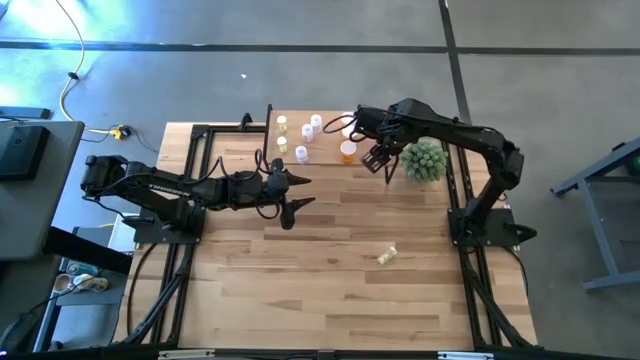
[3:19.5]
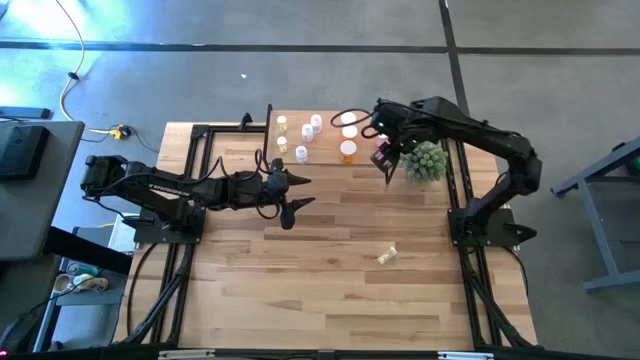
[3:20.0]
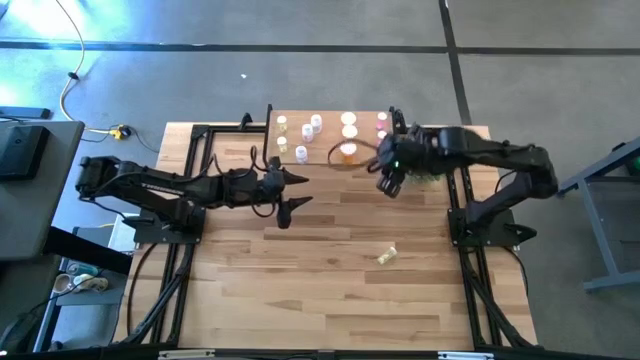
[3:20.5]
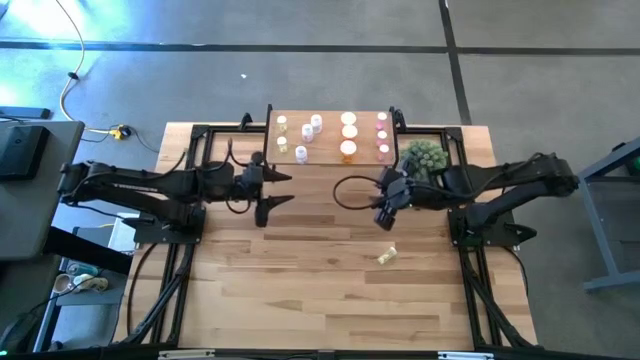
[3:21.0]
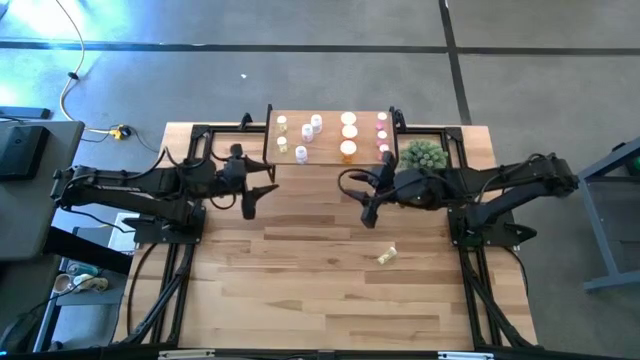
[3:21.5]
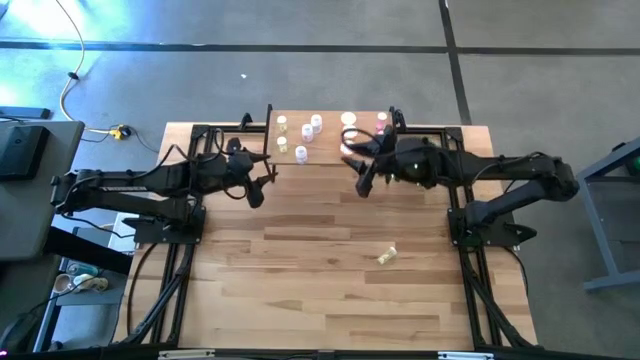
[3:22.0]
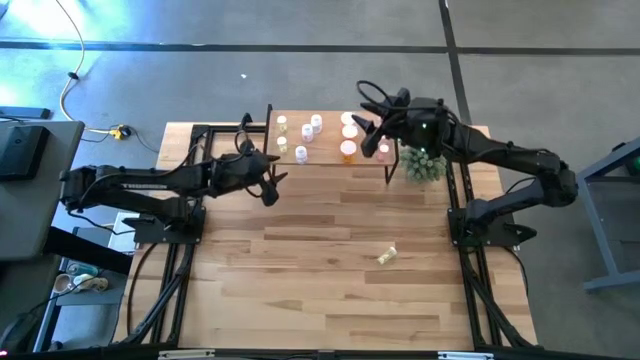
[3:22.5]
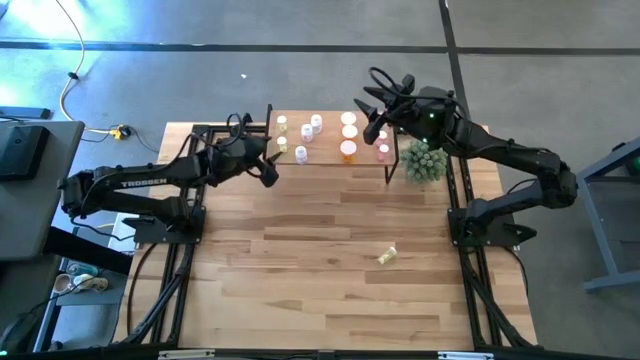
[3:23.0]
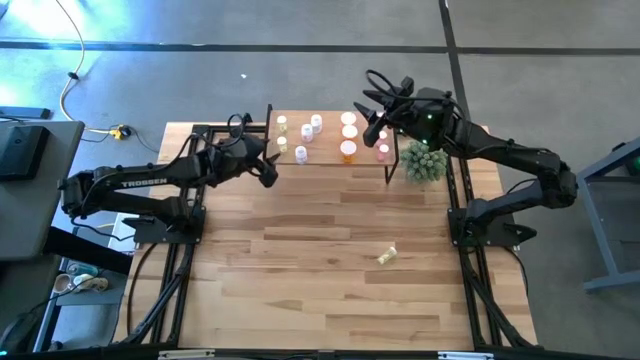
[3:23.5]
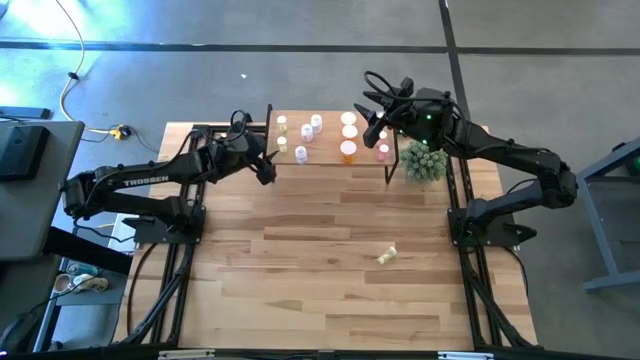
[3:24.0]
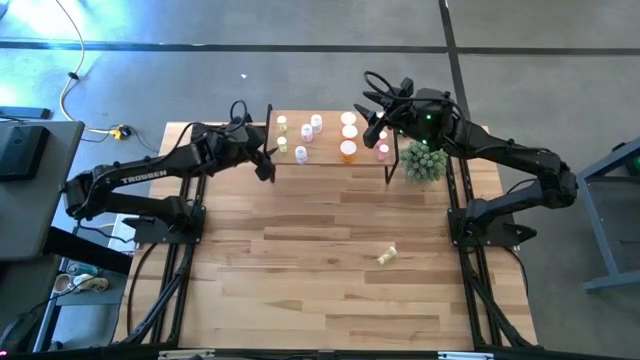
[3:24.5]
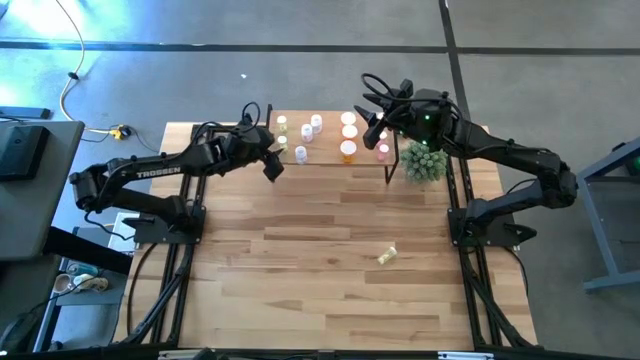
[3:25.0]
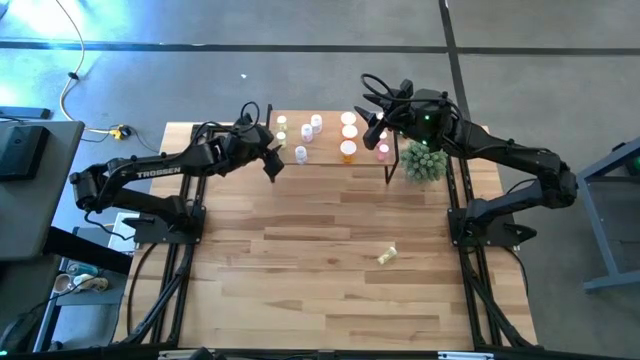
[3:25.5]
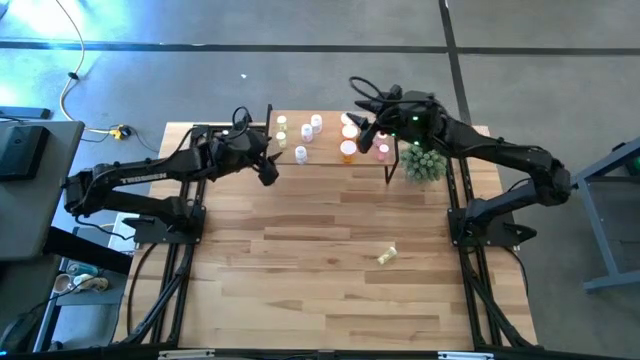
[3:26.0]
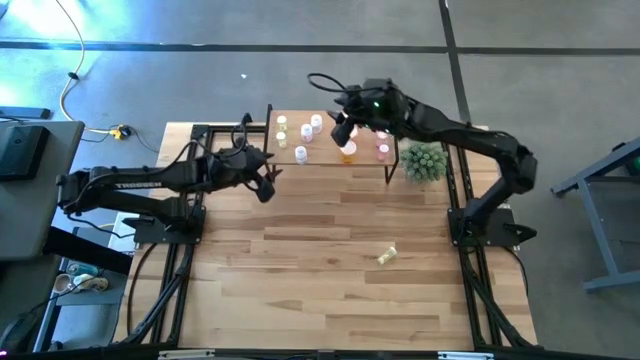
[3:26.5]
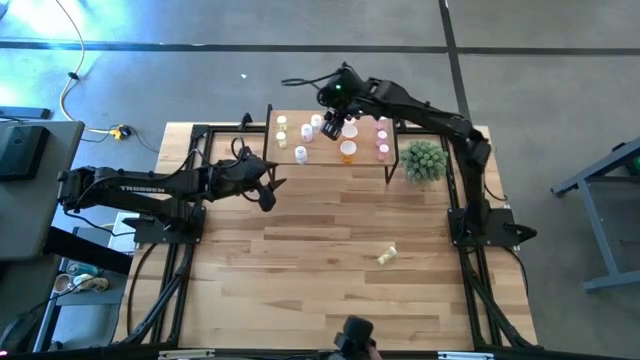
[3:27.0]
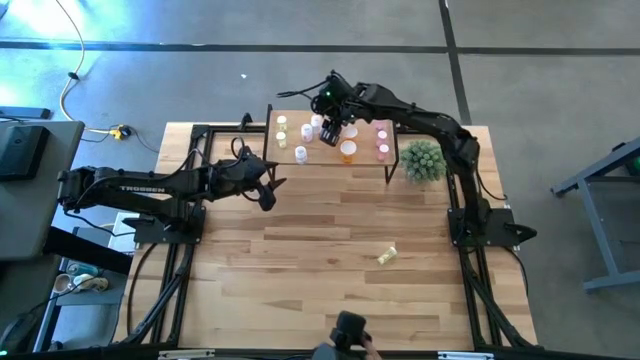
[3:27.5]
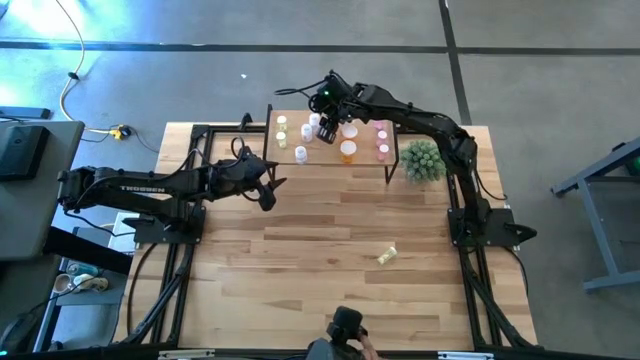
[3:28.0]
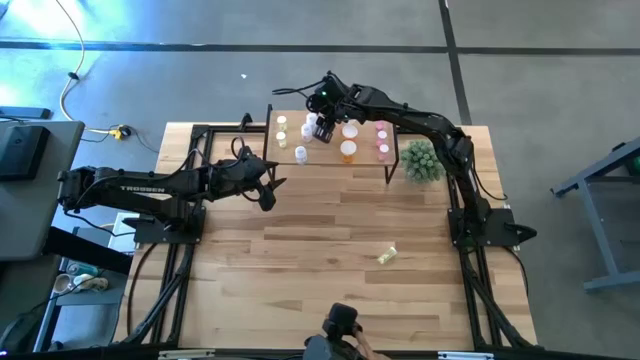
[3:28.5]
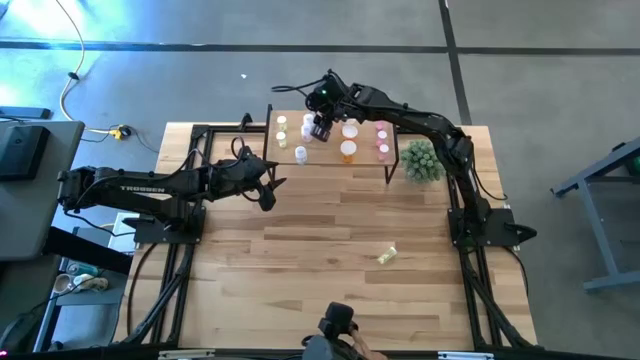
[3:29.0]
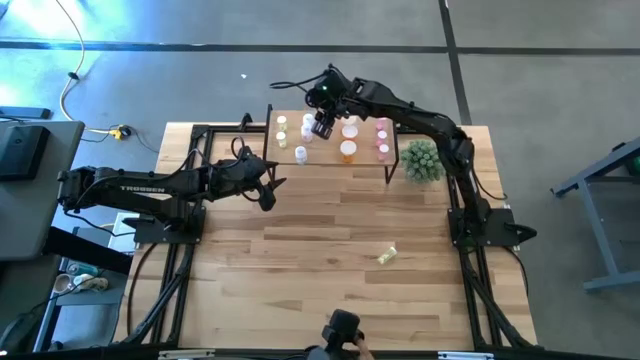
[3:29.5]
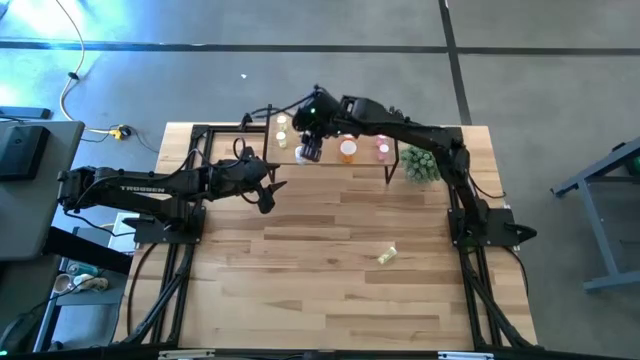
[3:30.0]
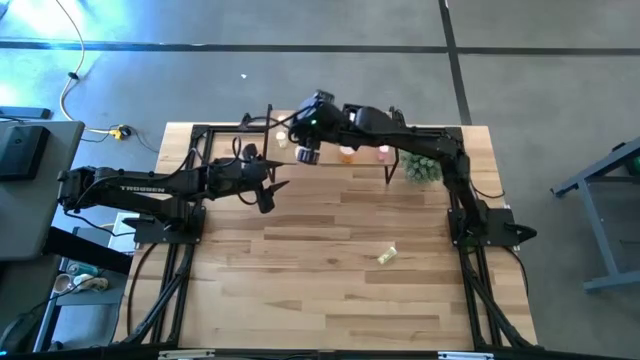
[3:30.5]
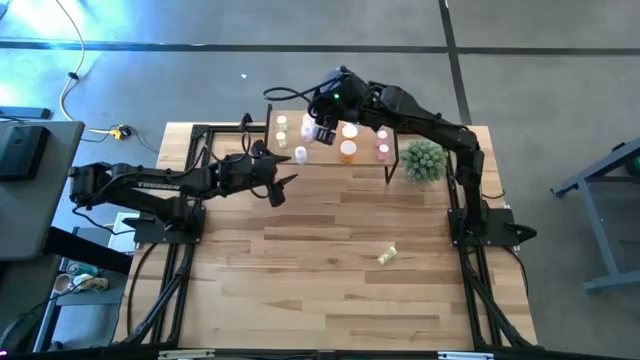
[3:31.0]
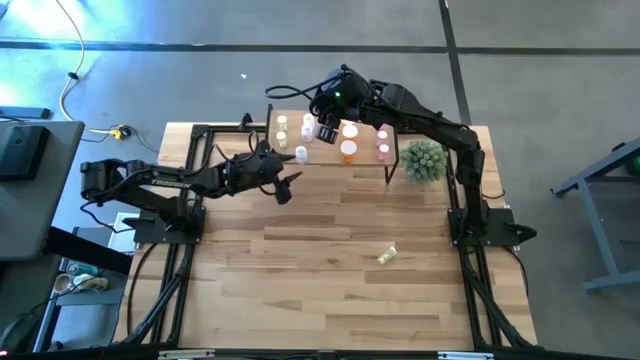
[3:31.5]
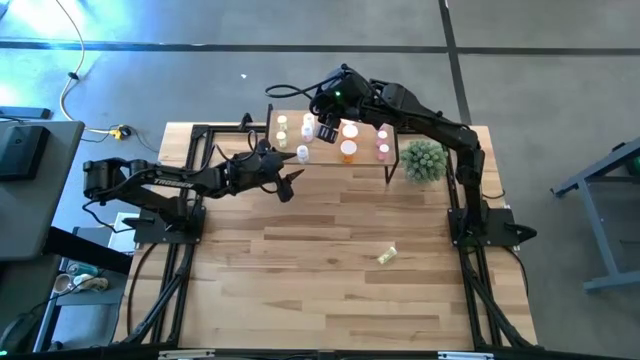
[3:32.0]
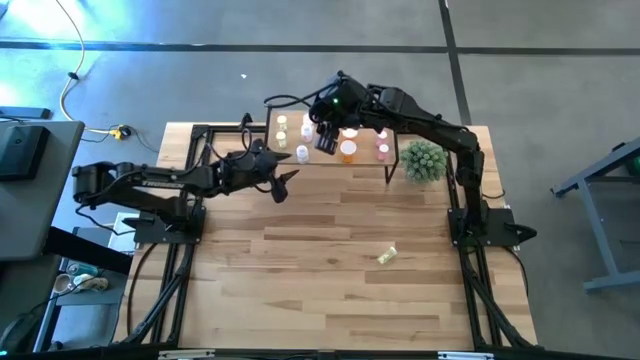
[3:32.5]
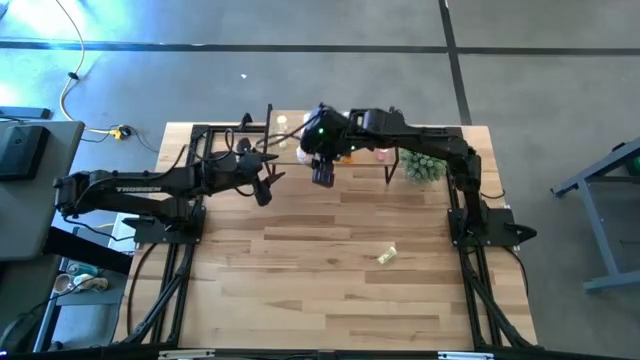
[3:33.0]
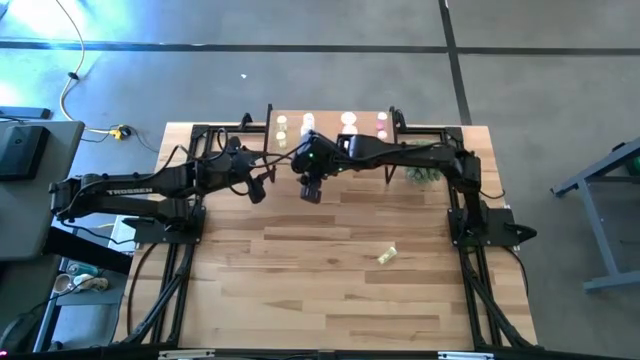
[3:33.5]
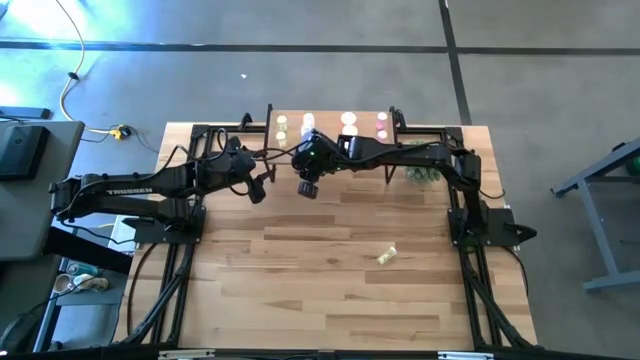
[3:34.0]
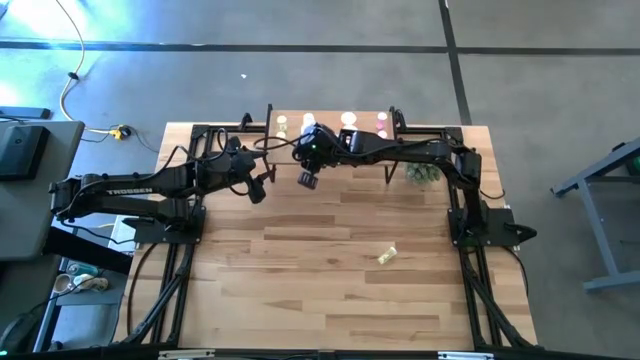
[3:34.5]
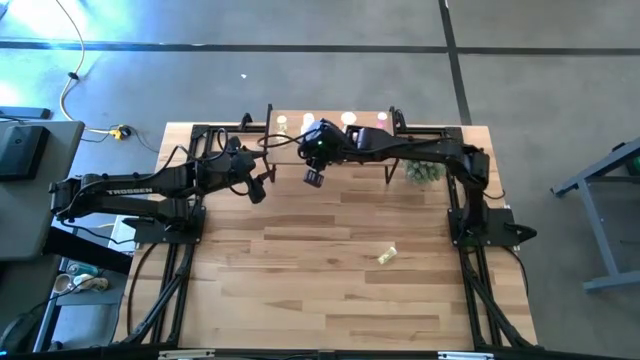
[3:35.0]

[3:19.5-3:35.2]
Task: Pick and place medicine bottles onto shelf by color
Adjust the pill bottles on the shelf

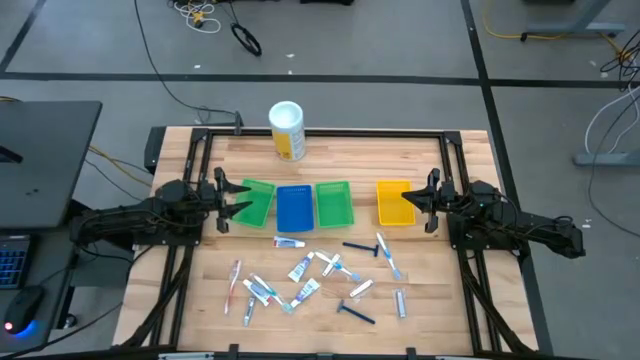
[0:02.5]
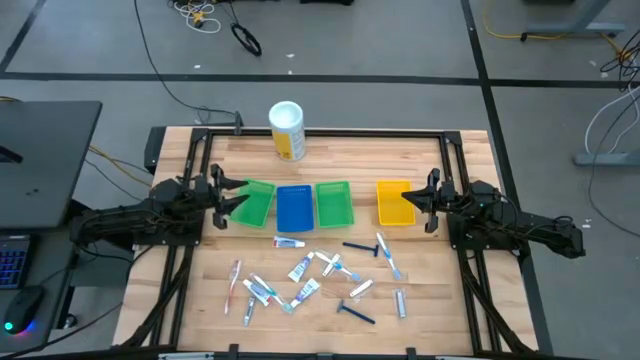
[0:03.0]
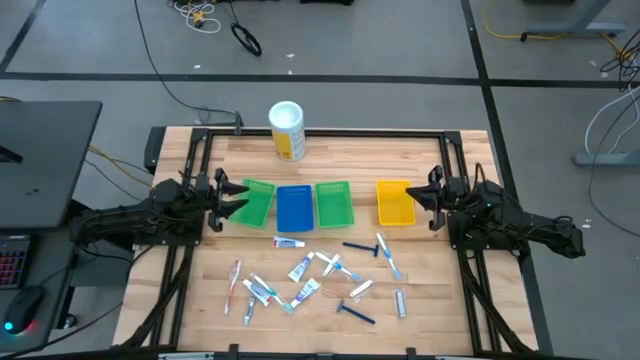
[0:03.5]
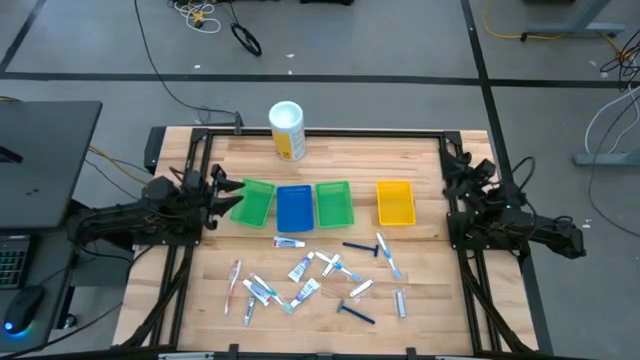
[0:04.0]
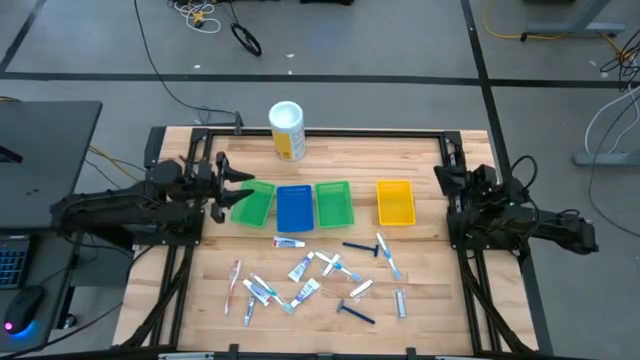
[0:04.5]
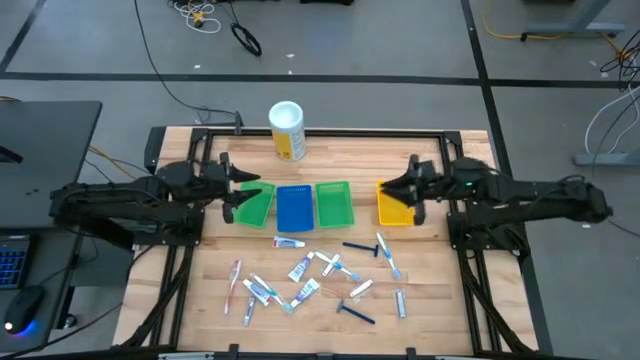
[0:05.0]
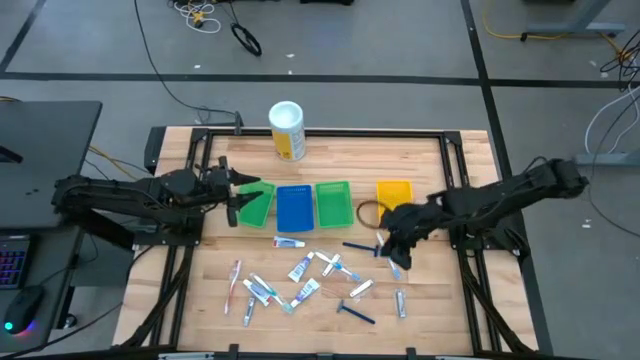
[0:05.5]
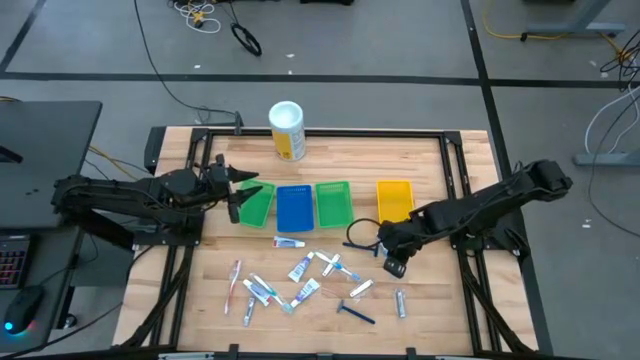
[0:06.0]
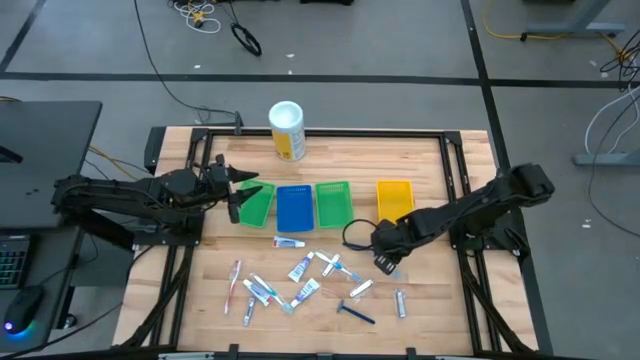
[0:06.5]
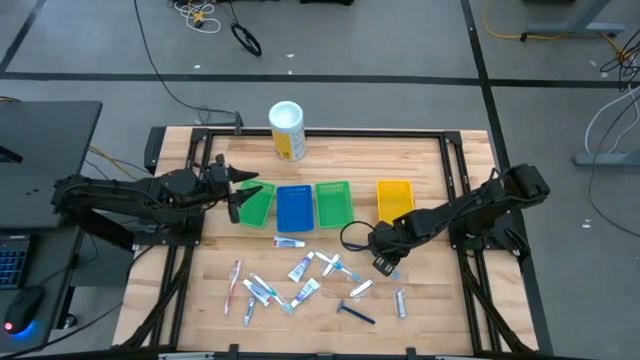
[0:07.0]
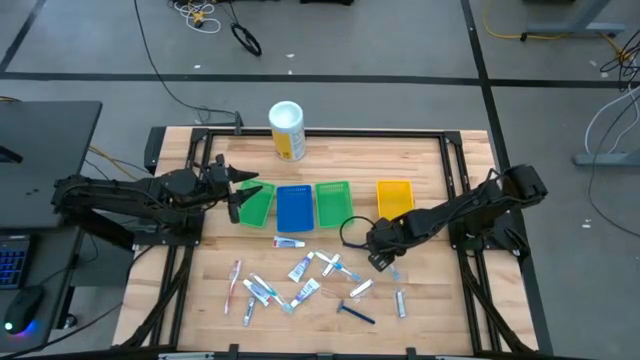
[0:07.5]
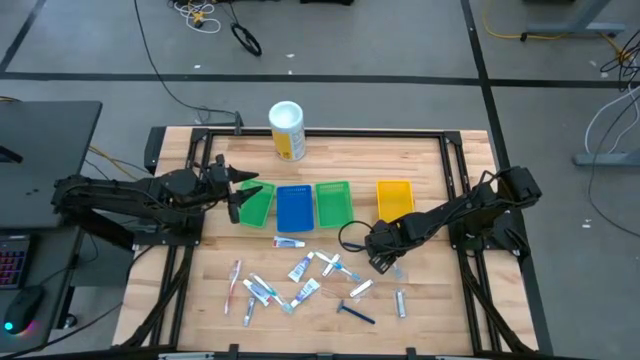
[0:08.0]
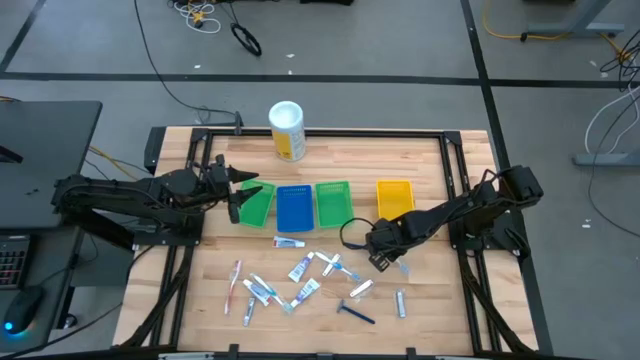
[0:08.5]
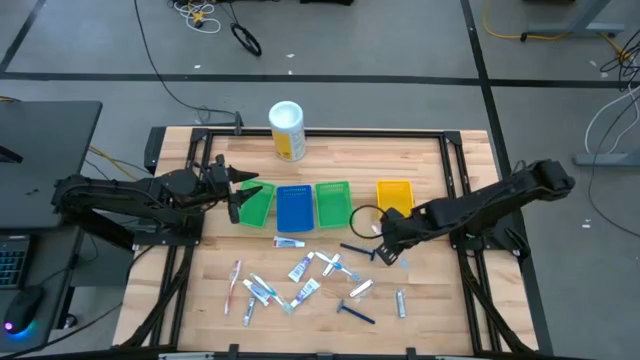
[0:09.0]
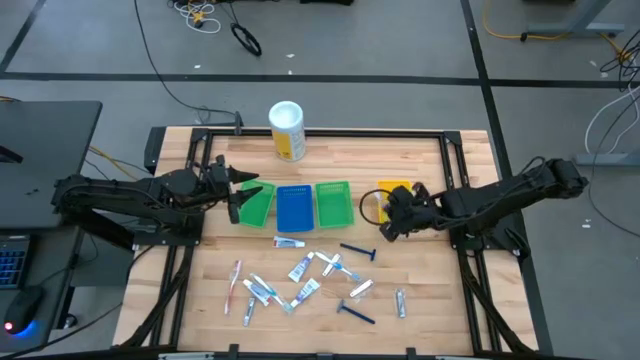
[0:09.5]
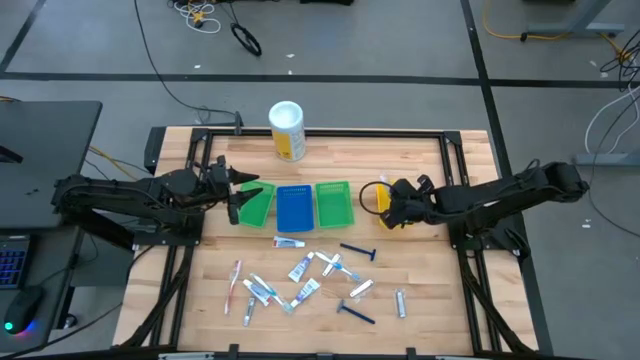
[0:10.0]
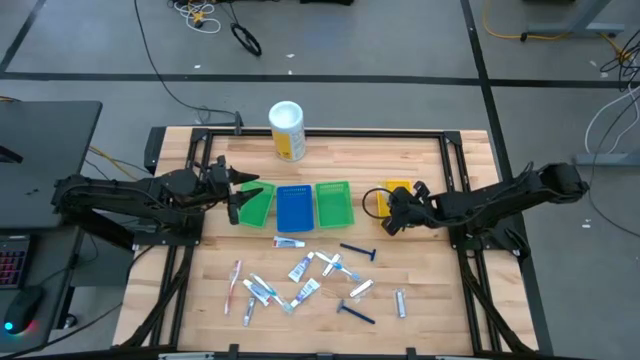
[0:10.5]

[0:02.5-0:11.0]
Task: Pick & Place Travel size toiletries
Put the blue and white toothbrush into the yellow bin
